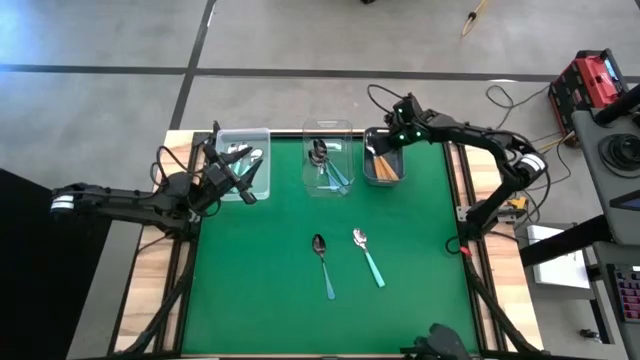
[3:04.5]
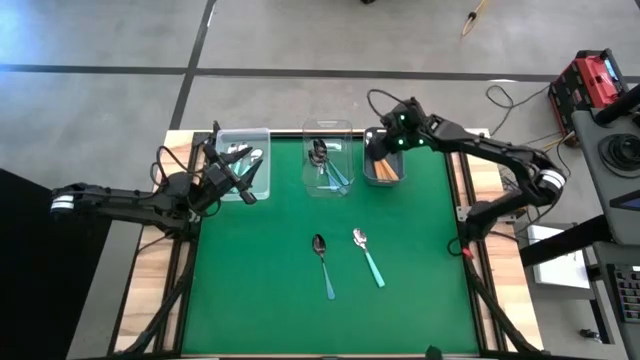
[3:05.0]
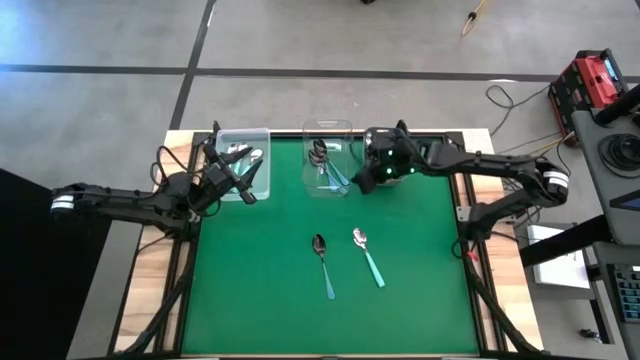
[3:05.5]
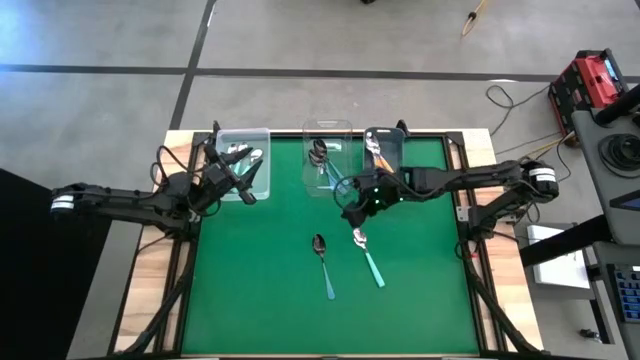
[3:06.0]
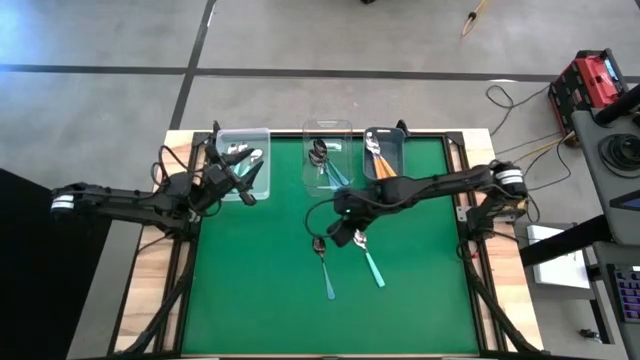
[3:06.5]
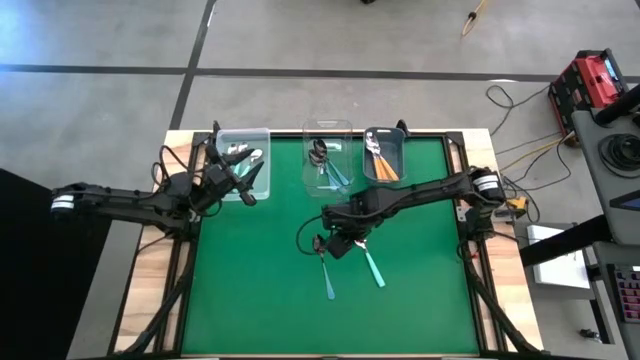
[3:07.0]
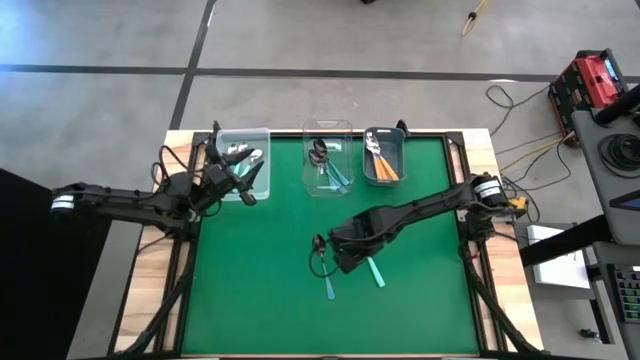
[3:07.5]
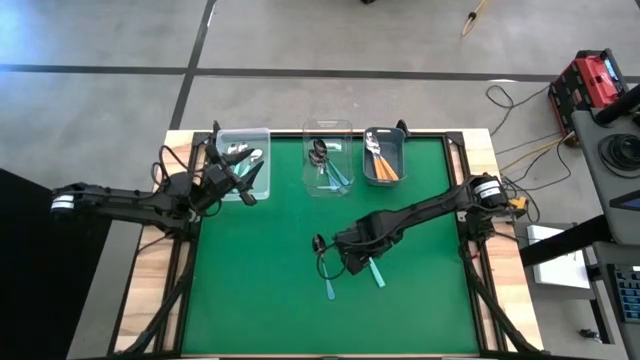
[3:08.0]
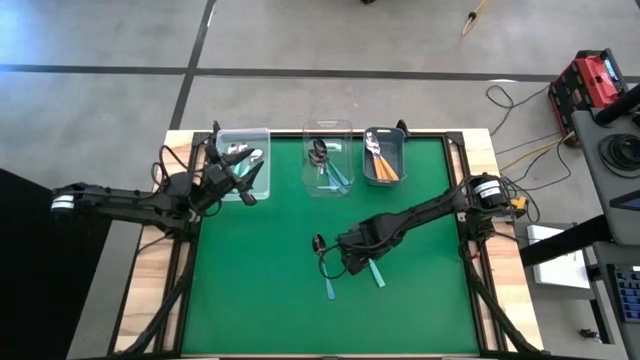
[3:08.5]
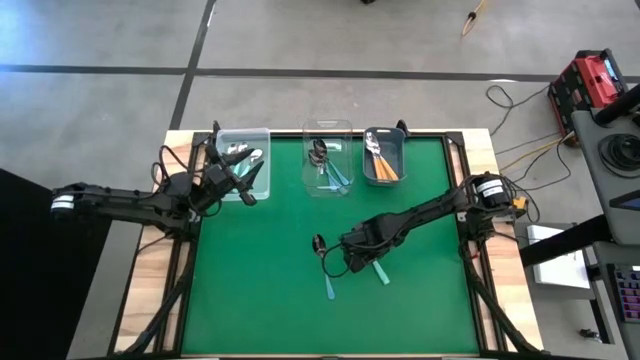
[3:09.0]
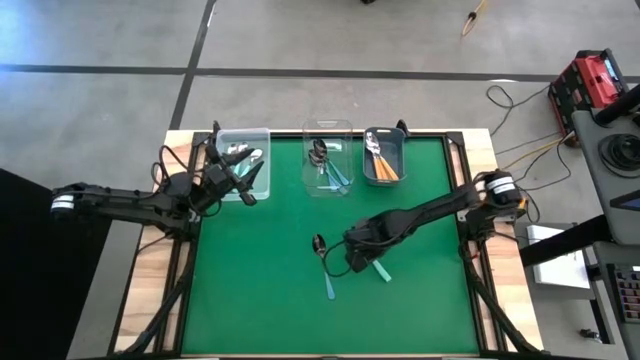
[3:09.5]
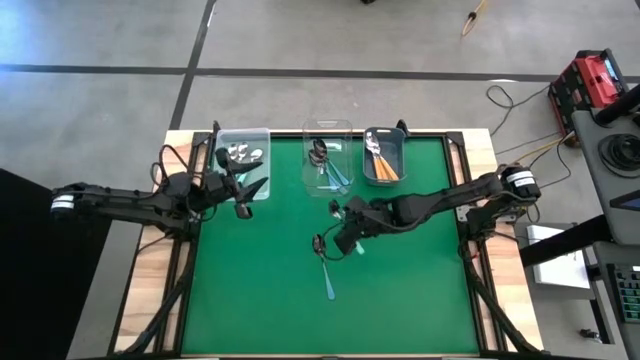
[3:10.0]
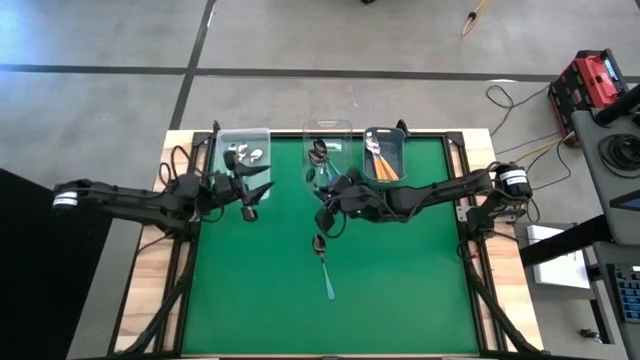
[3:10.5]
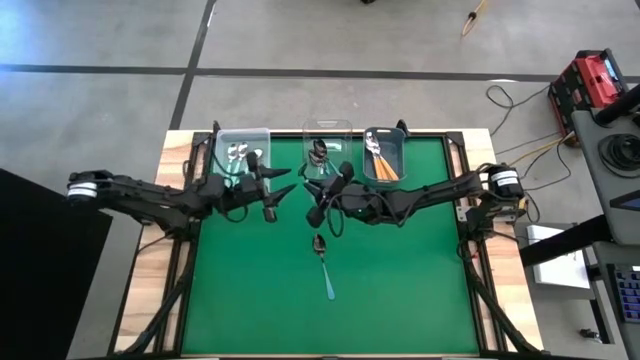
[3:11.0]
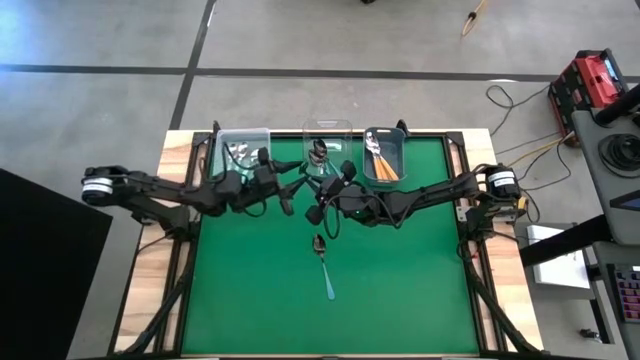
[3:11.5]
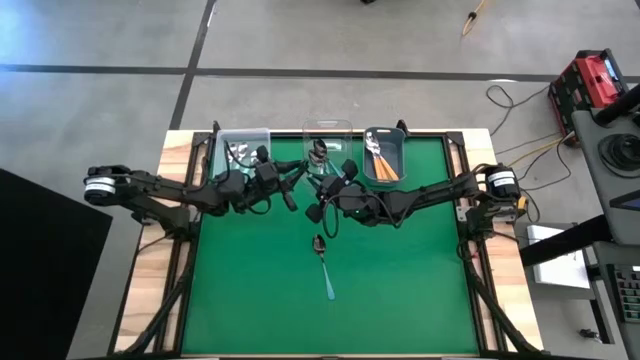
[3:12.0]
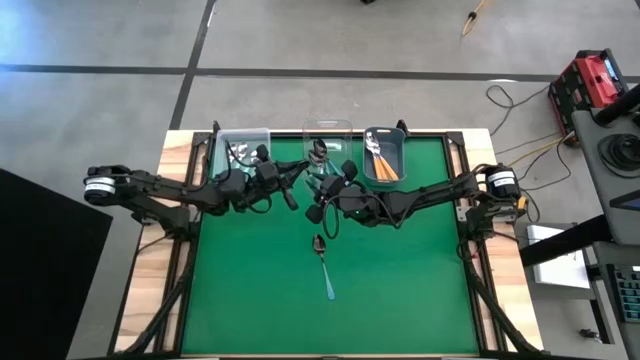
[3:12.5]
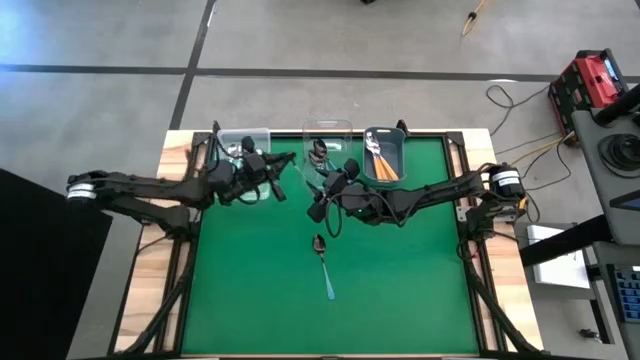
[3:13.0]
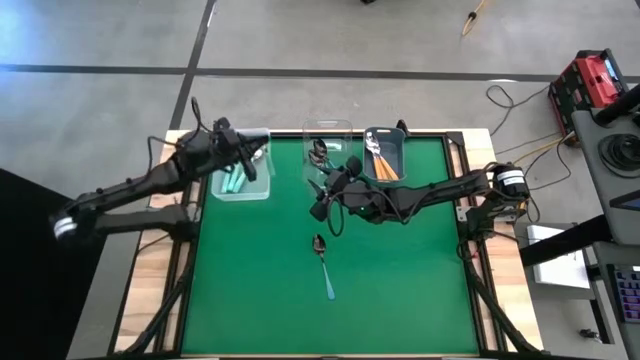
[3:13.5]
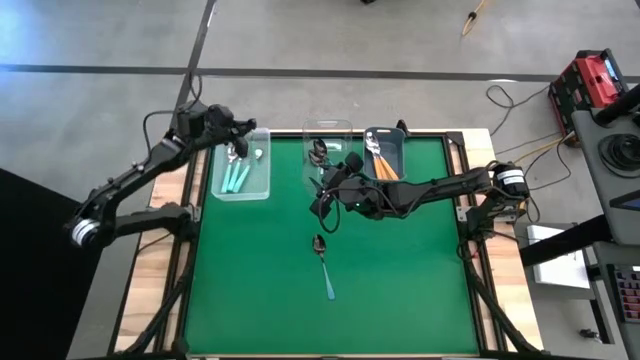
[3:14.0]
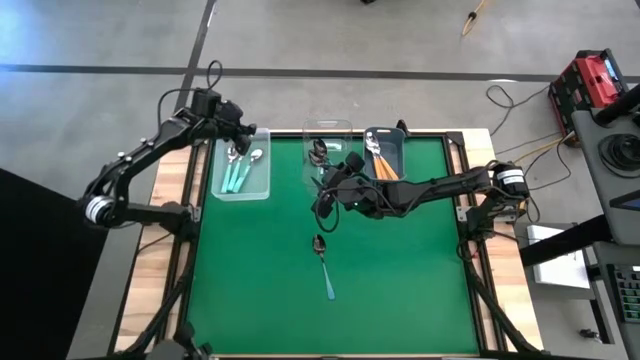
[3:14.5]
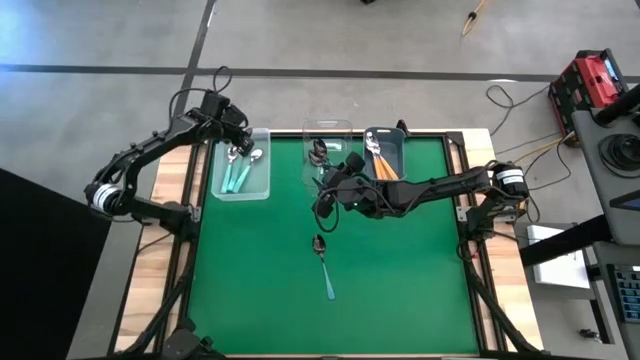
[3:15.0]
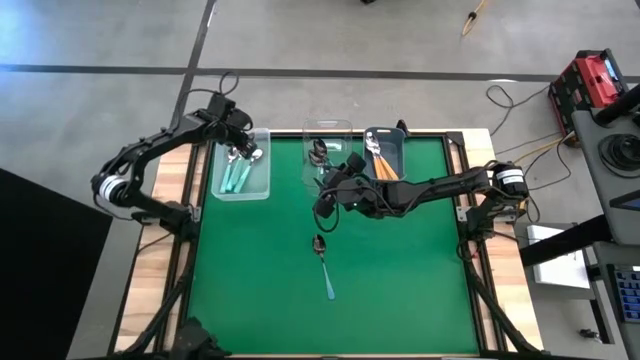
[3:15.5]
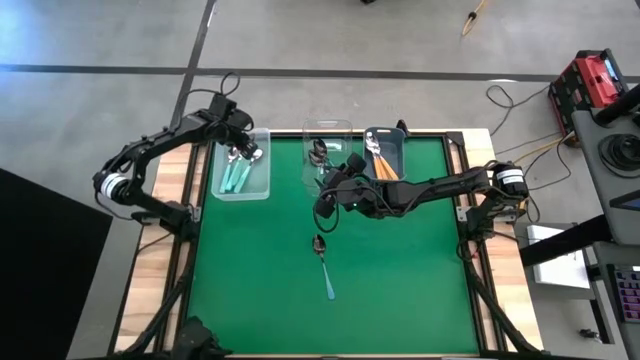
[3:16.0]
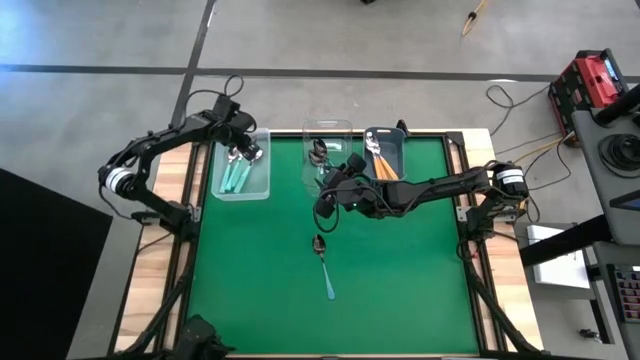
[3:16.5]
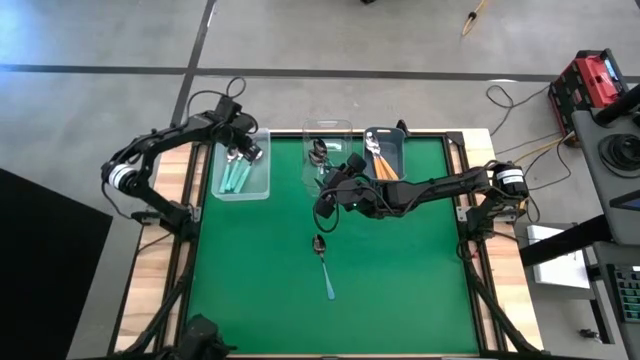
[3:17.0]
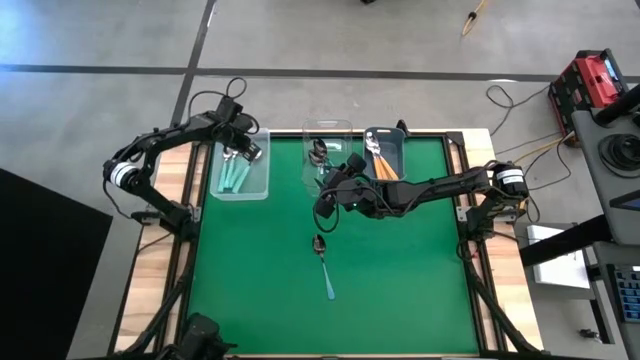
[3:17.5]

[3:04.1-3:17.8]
Task: Sort silverware by color (type)
Put the green spoon into the white bin

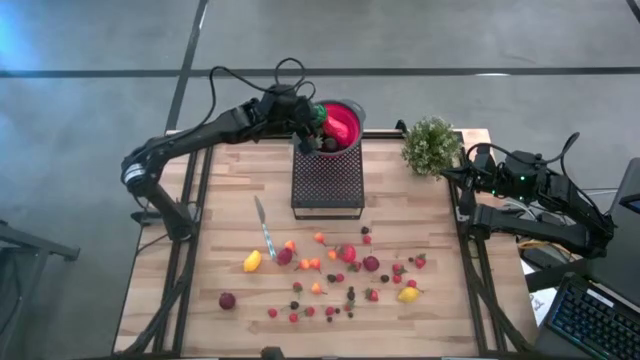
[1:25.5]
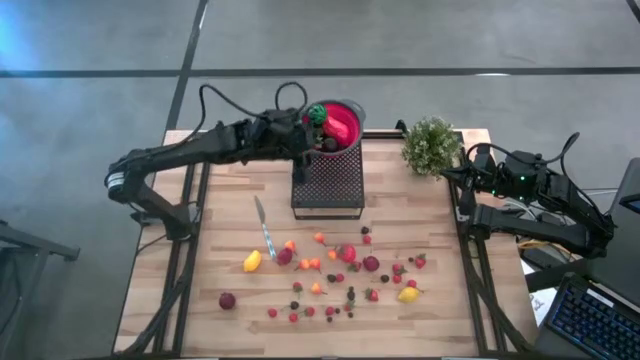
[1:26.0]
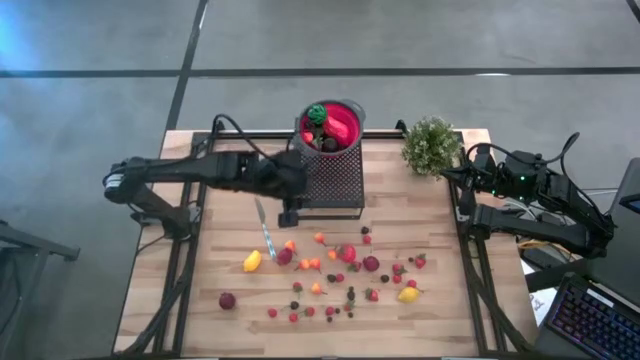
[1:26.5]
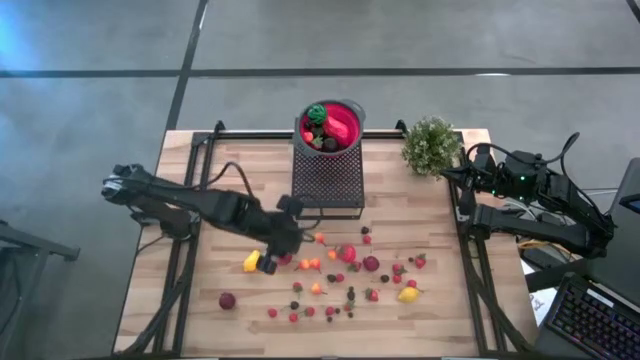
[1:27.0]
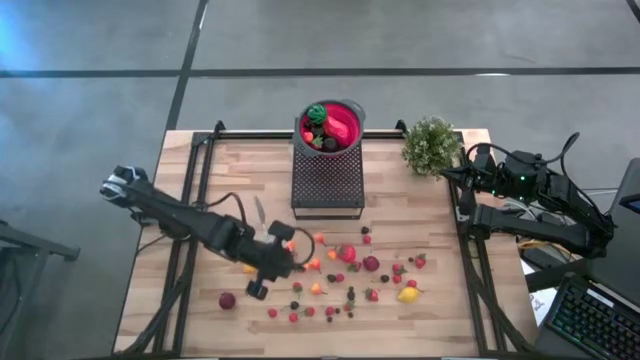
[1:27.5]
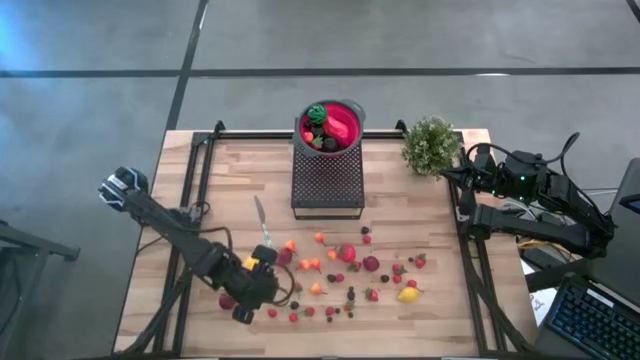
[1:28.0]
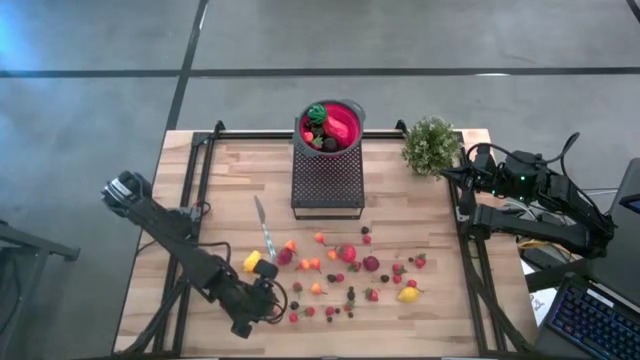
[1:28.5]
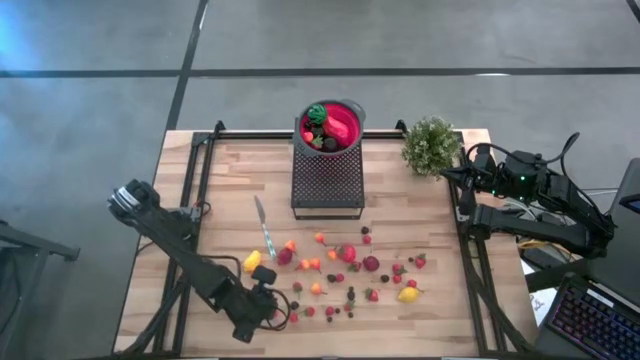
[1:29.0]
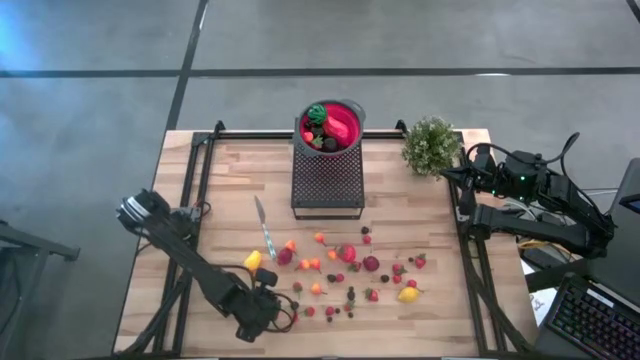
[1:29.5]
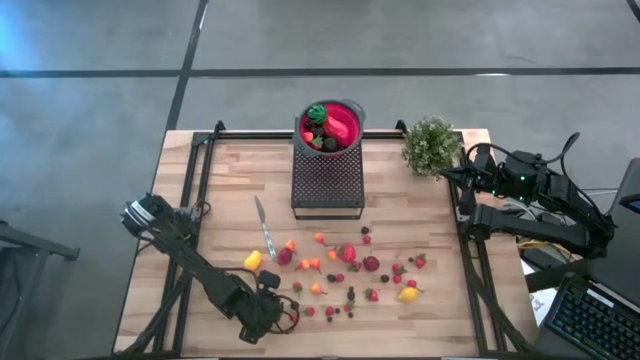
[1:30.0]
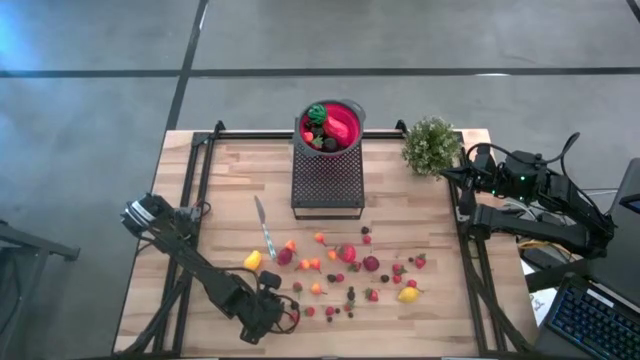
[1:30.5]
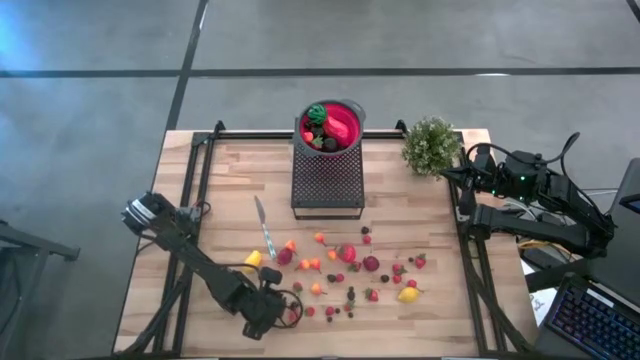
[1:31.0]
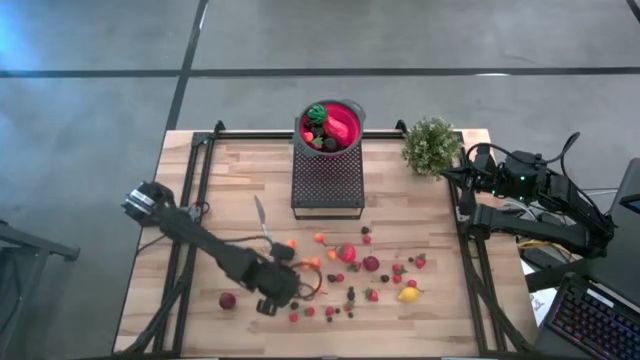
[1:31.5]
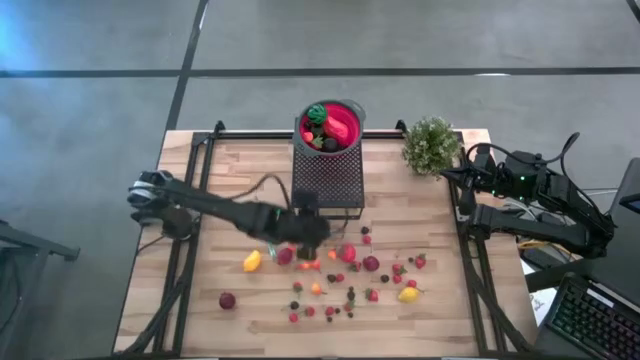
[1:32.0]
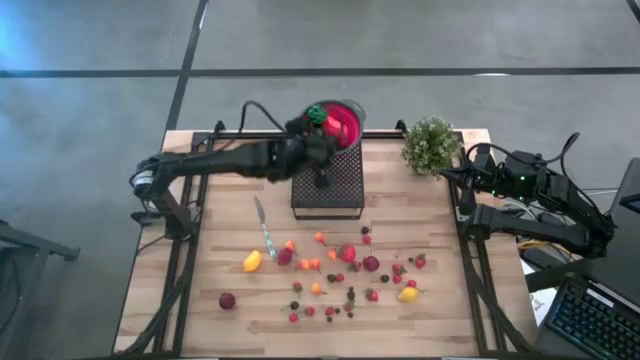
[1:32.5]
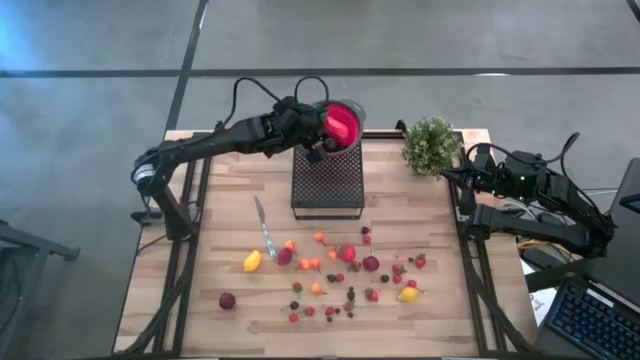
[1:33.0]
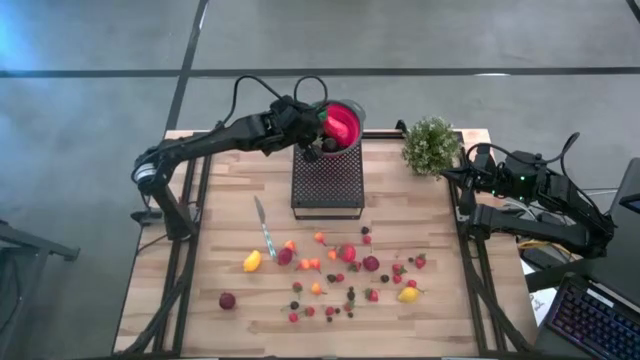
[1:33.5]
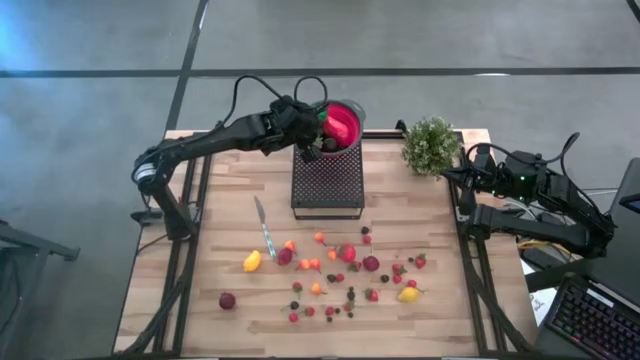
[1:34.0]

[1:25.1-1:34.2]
Task: Pick & Place Fruit
Put the left raspberry into the strainer bowl on the shelf
